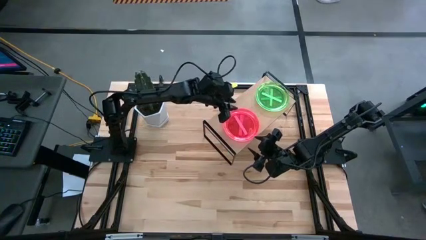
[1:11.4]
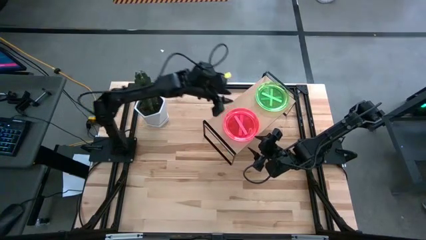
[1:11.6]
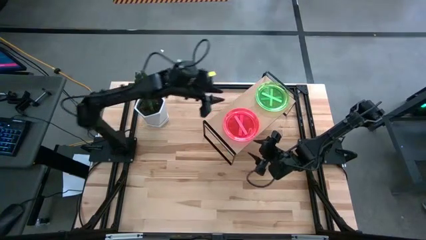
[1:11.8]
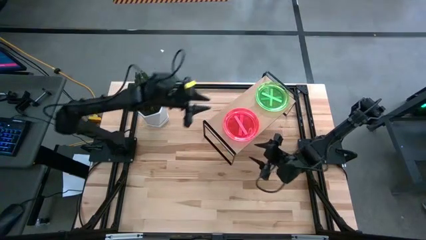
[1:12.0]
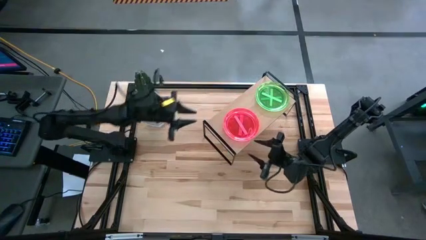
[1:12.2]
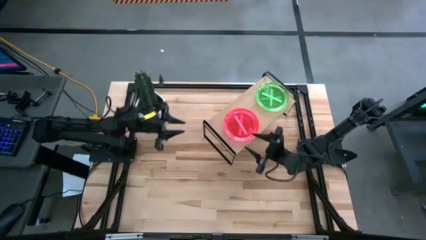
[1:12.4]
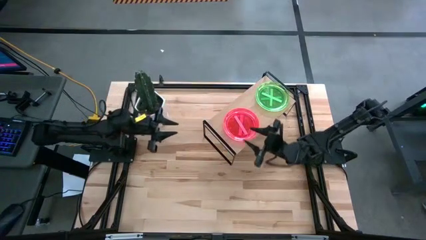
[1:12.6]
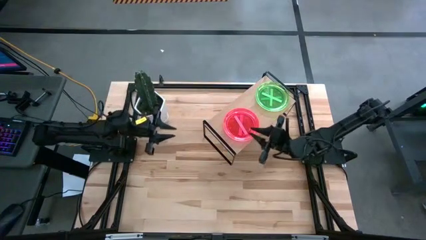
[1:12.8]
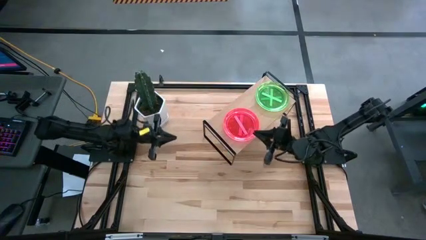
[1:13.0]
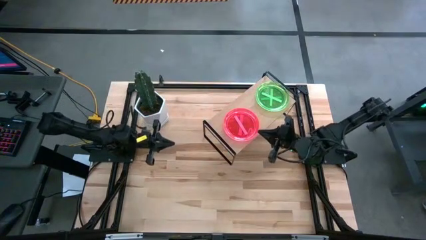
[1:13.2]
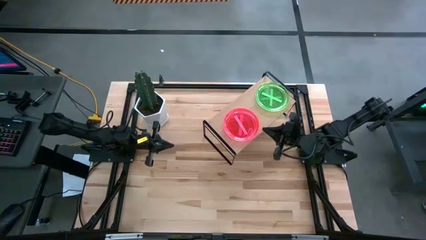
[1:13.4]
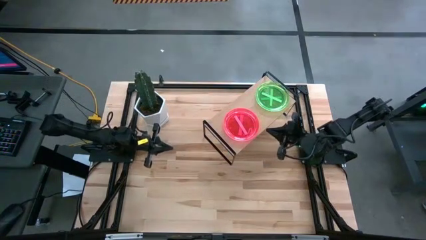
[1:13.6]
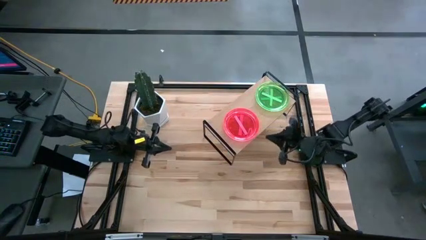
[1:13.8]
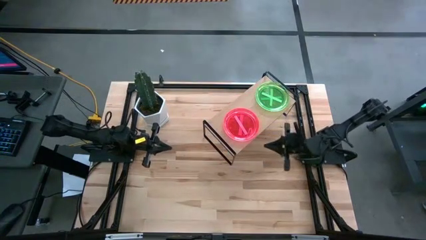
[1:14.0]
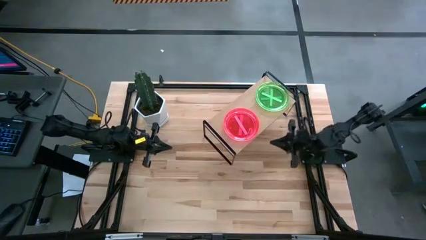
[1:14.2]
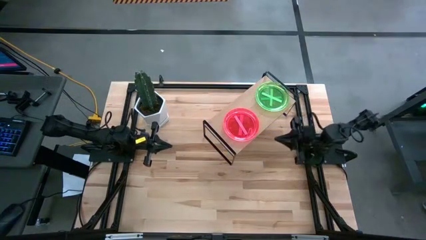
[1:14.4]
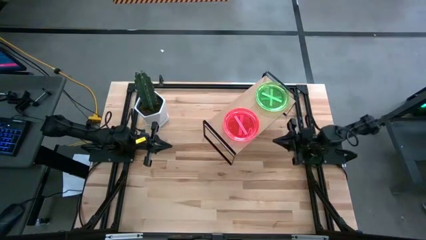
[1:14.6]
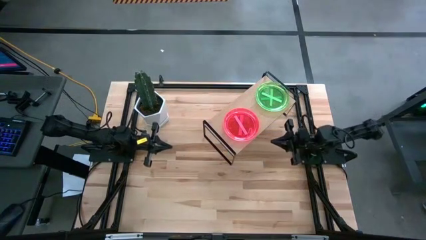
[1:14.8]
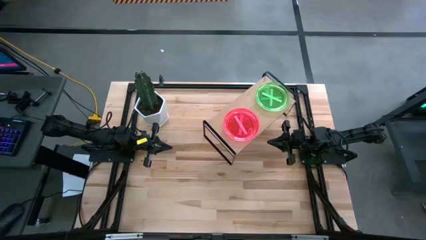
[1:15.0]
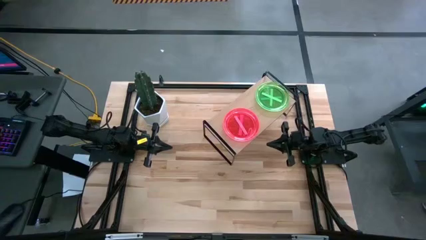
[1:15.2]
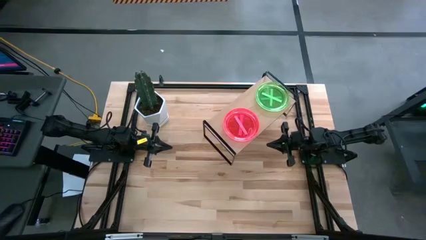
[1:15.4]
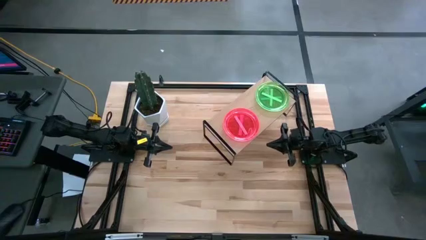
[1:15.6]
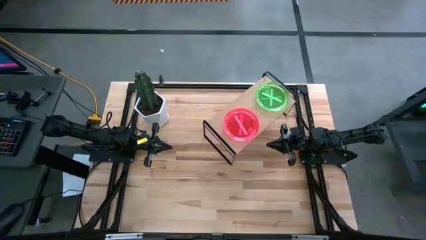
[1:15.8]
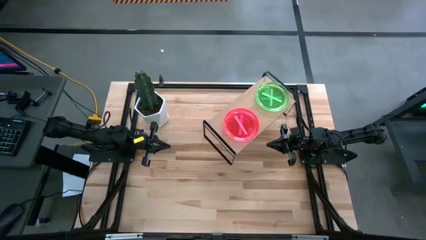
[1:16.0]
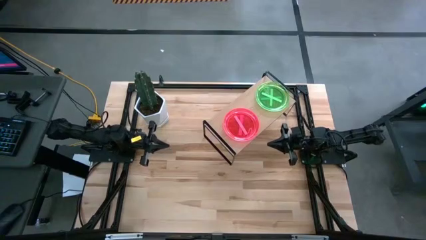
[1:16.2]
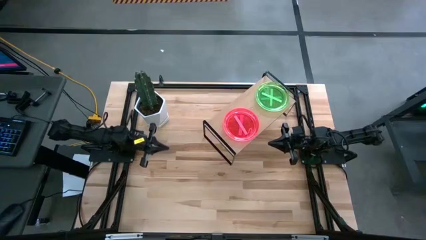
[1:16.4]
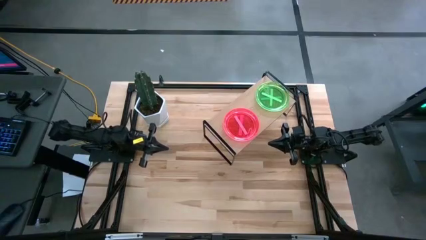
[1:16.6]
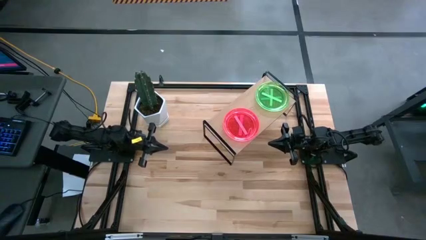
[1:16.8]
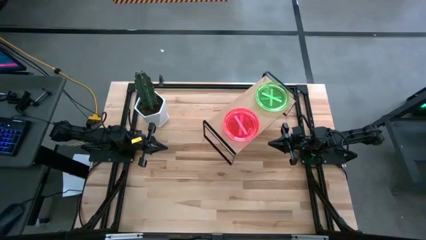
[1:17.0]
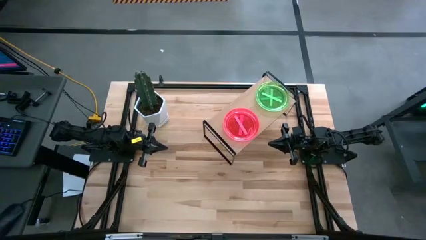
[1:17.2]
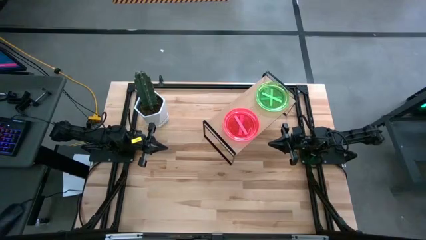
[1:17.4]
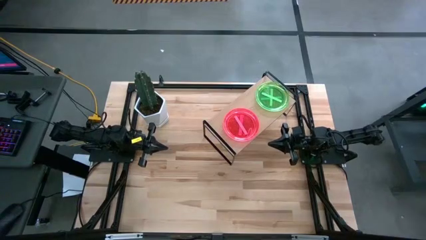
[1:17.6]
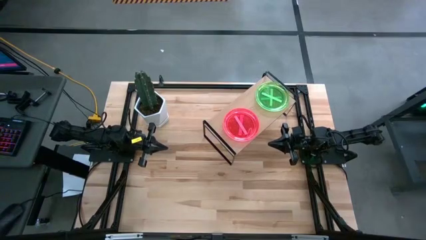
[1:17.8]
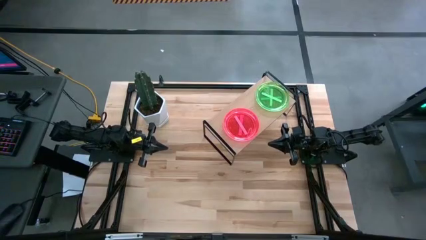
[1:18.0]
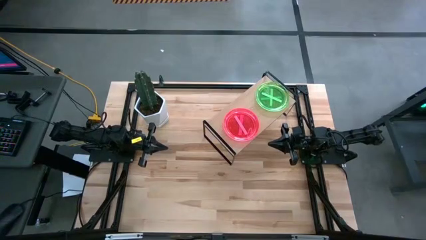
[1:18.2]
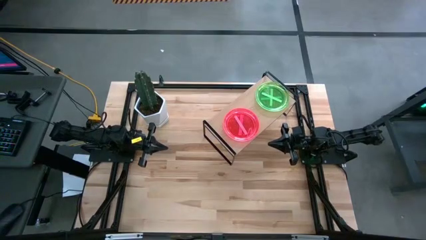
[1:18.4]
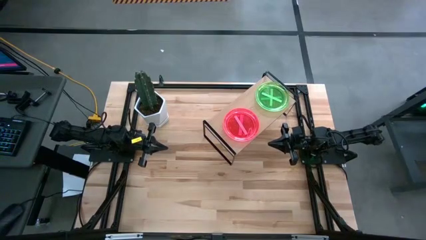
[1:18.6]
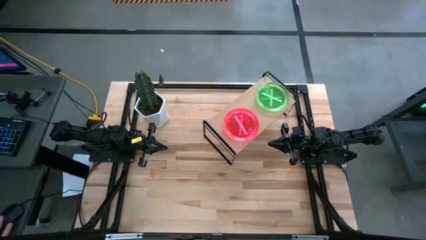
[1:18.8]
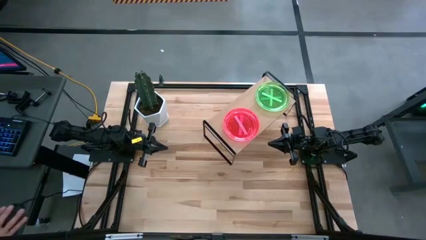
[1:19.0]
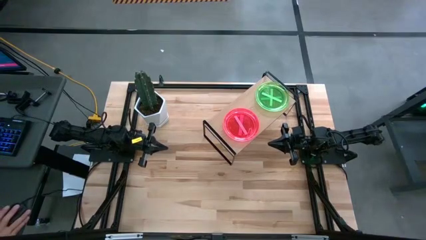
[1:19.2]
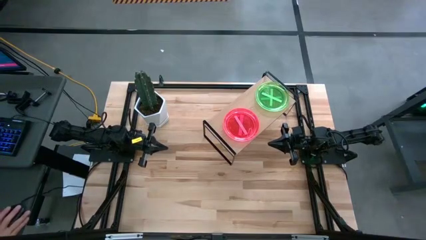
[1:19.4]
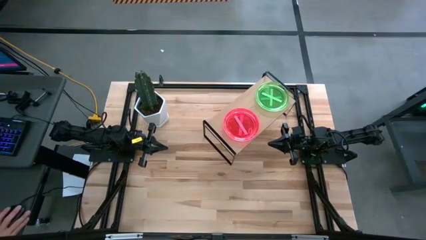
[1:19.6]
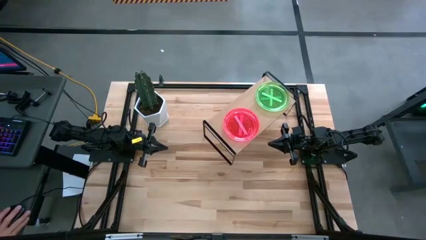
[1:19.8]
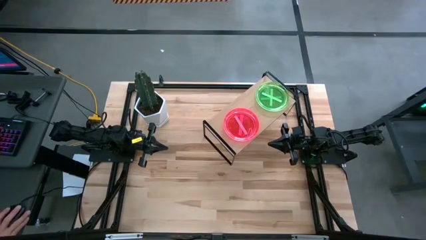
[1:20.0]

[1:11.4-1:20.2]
Task: Place and stack plates onto a shelf
Return to Home Position

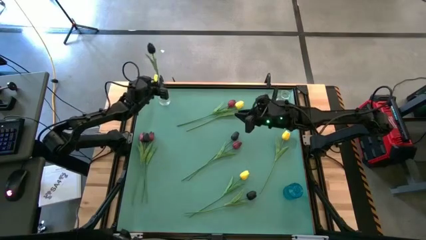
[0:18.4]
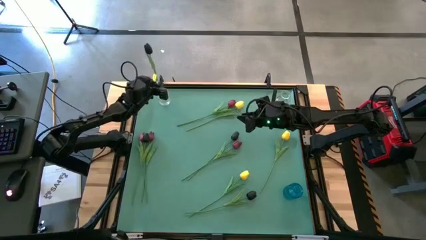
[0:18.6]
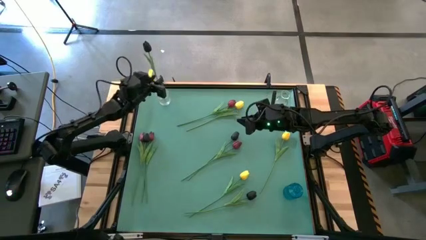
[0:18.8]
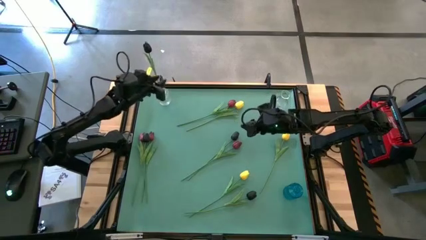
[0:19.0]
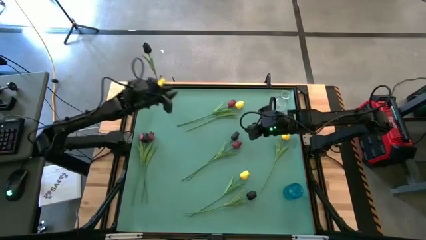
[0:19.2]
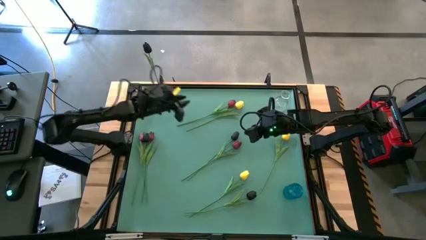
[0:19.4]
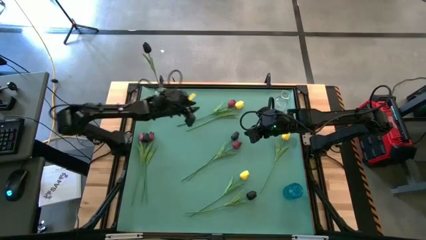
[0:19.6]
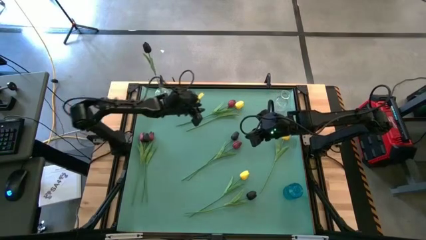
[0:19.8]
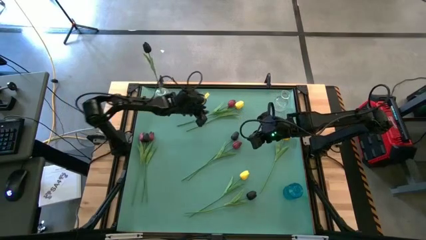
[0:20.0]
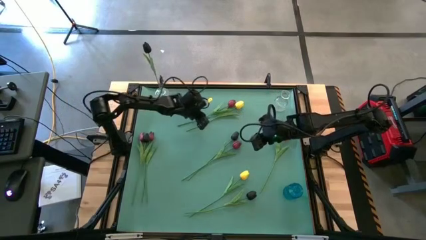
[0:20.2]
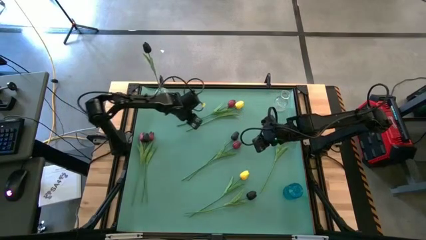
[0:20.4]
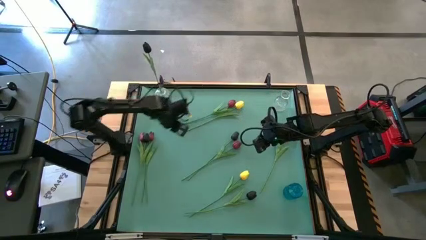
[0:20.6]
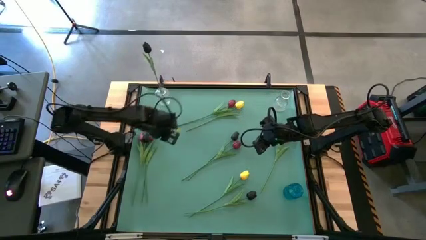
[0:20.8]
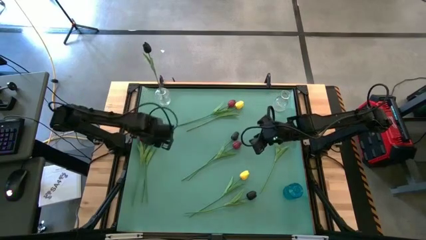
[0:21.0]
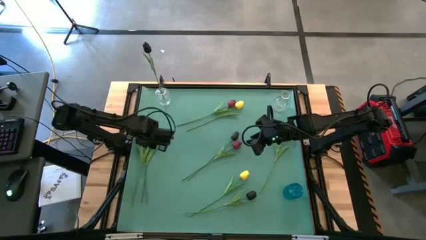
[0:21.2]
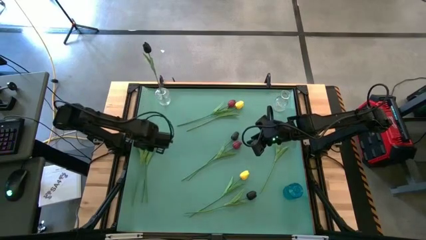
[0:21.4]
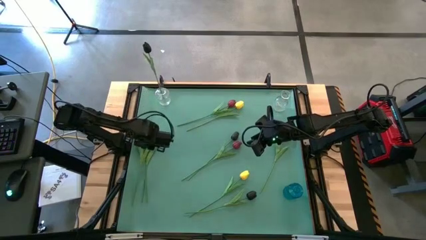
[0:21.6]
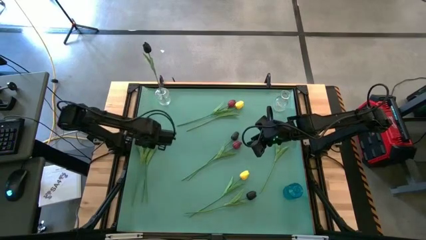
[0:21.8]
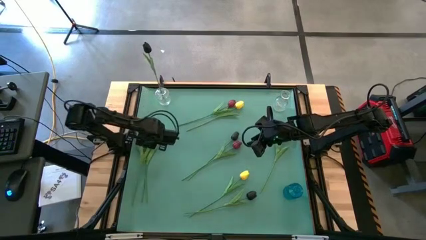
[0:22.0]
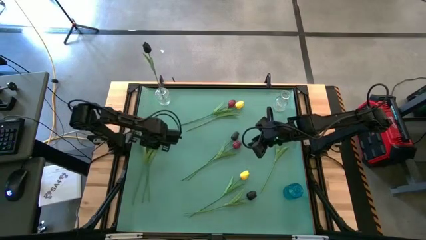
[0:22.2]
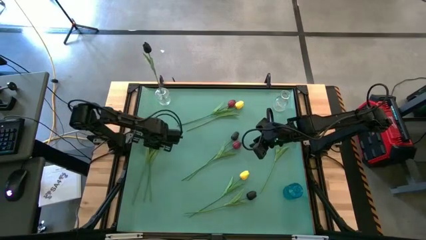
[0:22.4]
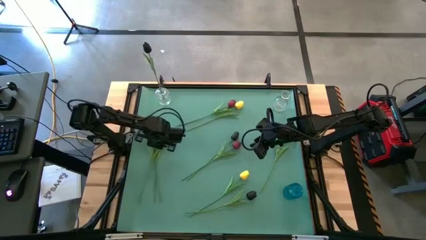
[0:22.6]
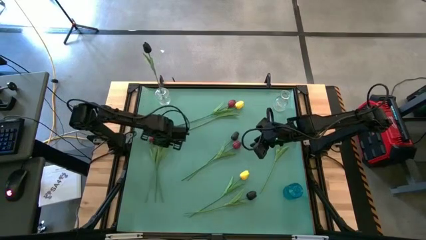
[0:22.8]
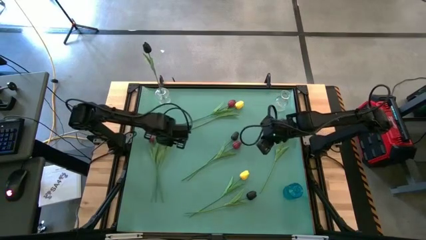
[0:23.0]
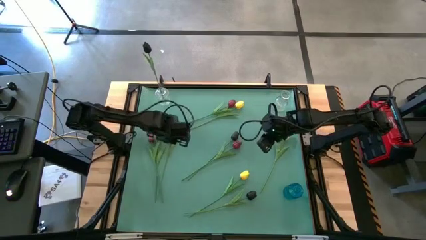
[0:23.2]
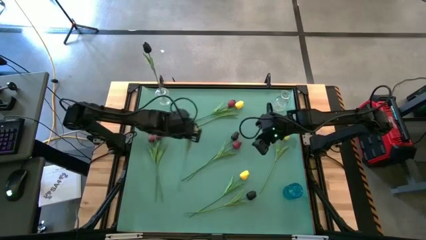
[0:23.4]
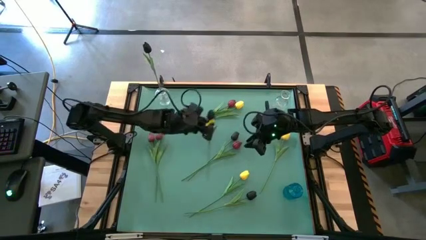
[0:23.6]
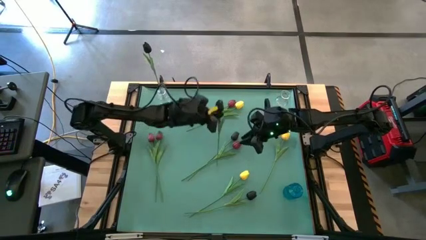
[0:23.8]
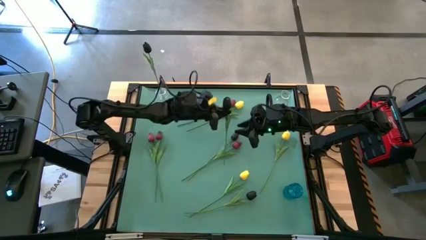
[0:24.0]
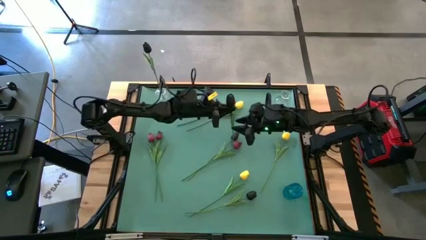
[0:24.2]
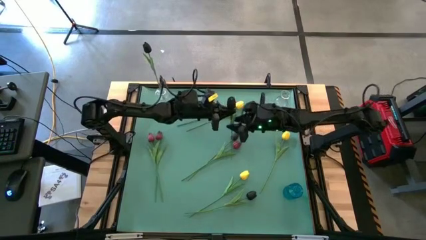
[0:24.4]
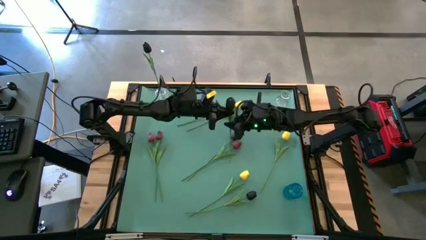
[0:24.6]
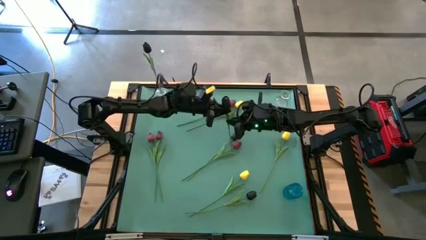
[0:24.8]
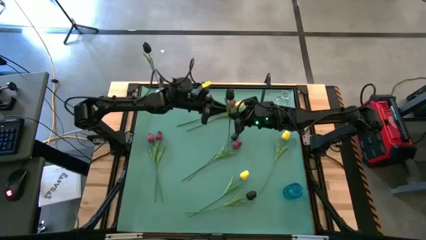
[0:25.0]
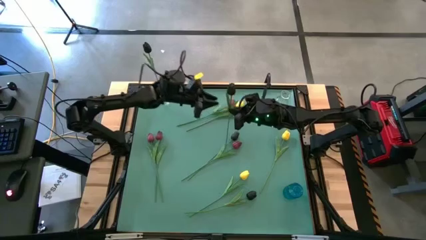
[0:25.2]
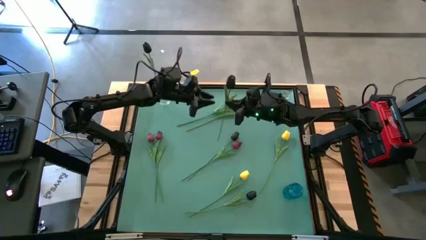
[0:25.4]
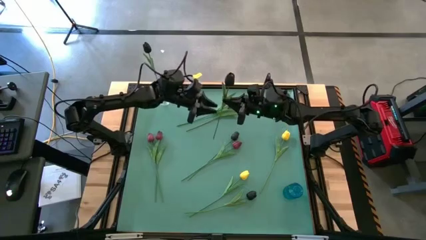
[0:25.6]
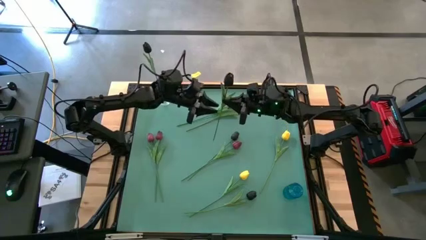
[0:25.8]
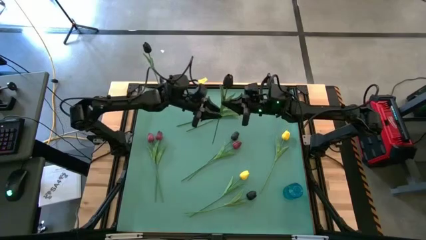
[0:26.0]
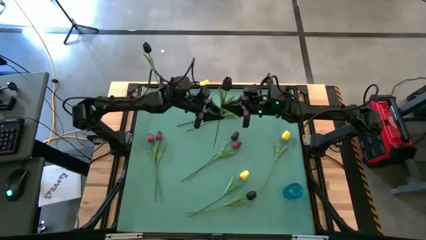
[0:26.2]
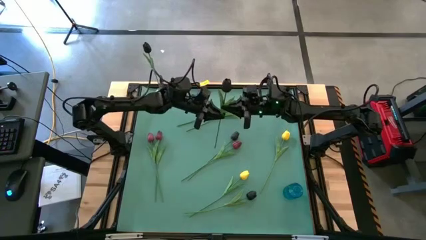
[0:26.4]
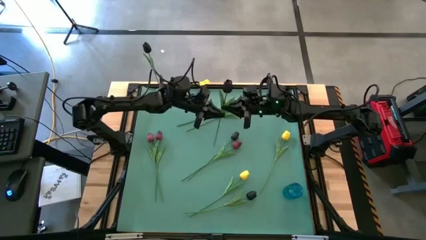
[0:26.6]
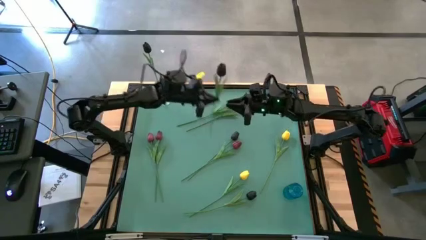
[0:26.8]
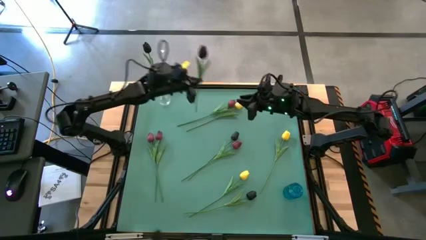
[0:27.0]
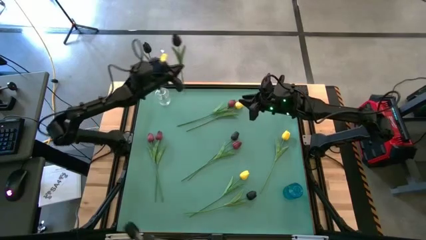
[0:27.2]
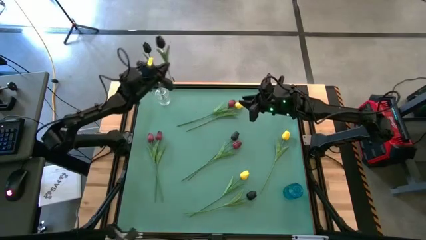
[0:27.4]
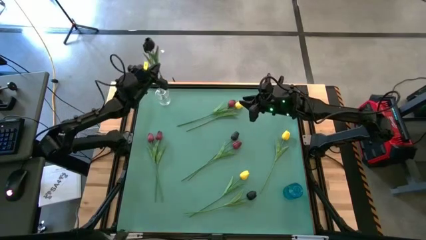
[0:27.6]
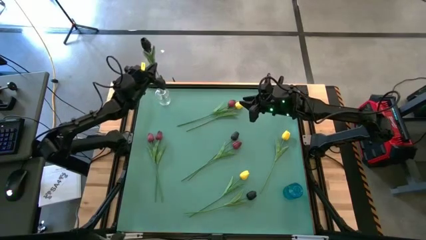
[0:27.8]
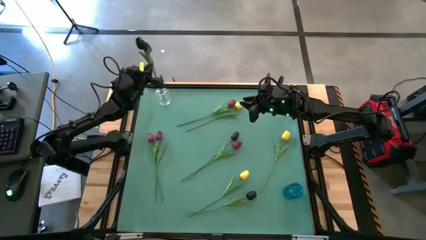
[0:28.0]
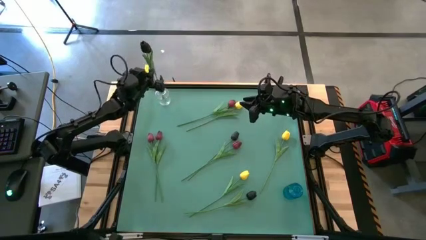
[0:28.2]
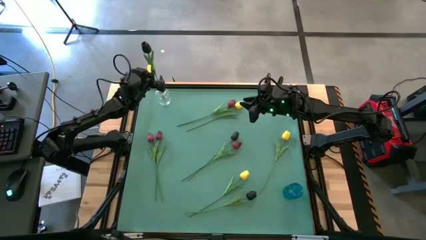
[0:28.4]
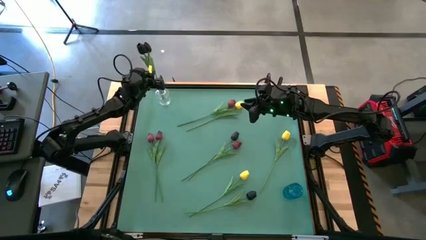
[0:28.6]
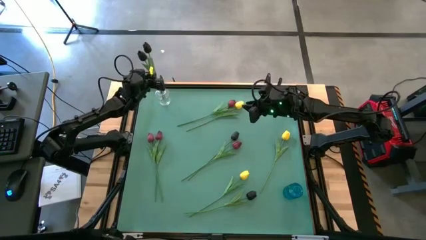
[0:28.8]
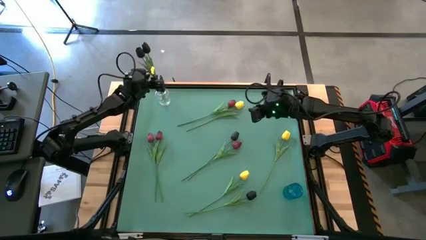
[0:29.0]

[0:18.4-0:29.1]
Task: Sort flowers into vase by color
Put the black flower into the left transparent vase
